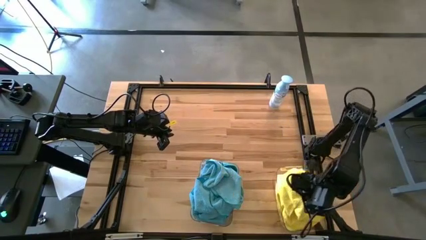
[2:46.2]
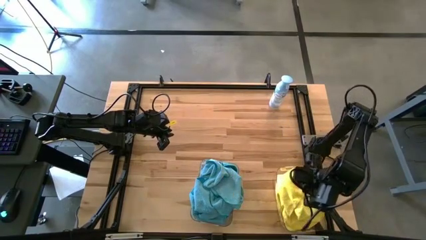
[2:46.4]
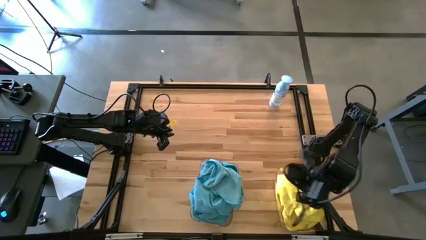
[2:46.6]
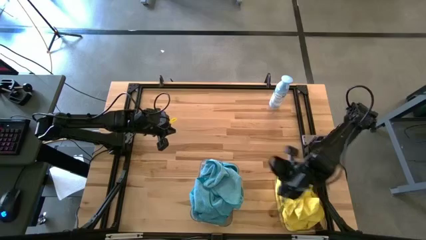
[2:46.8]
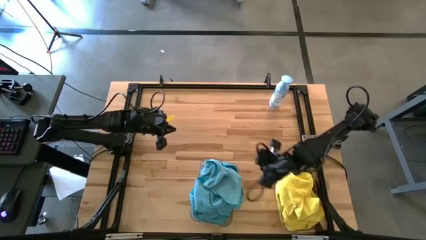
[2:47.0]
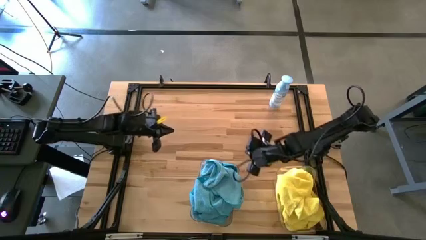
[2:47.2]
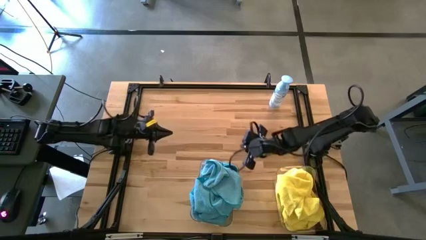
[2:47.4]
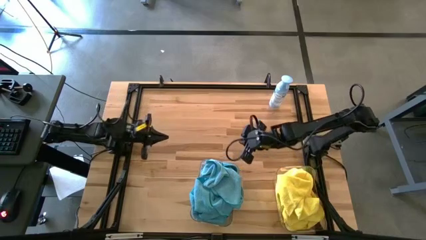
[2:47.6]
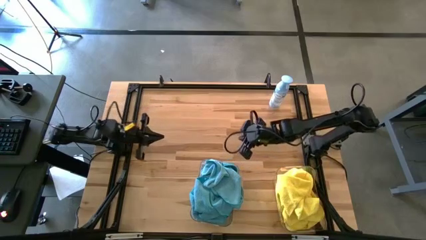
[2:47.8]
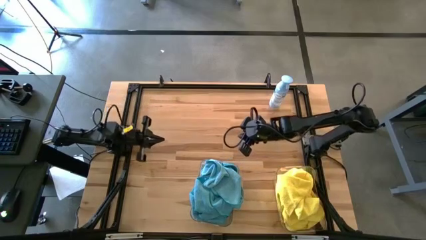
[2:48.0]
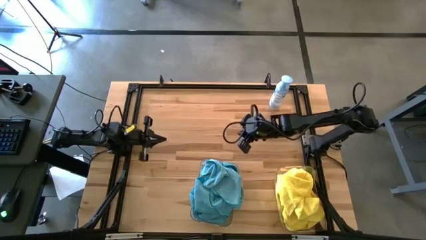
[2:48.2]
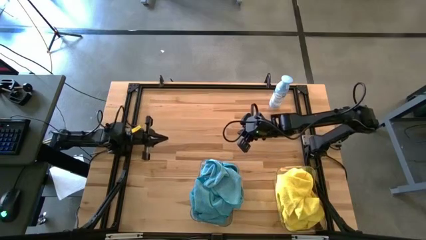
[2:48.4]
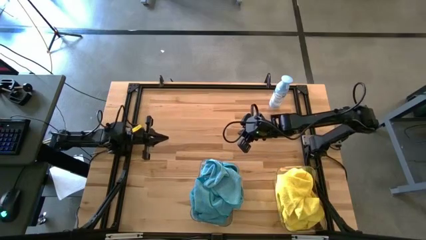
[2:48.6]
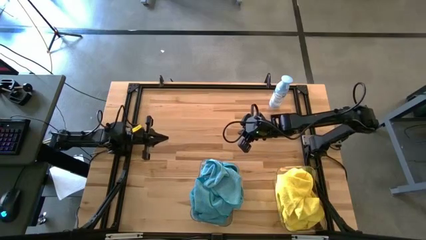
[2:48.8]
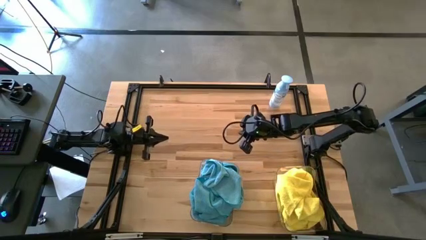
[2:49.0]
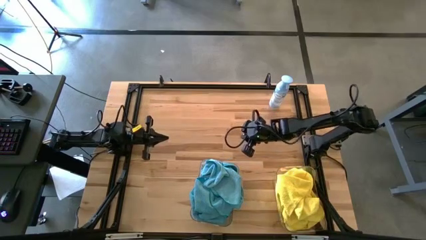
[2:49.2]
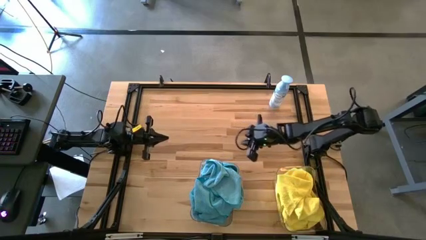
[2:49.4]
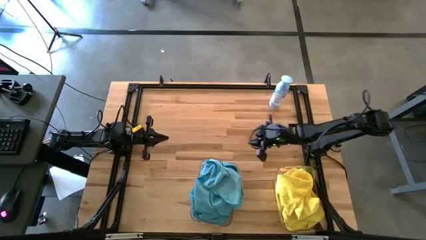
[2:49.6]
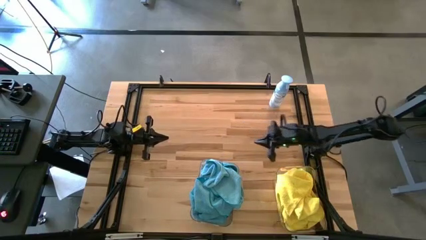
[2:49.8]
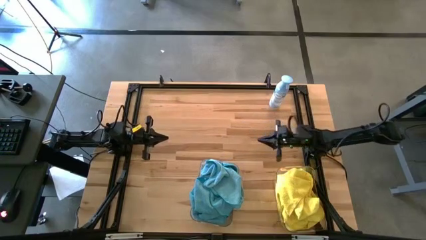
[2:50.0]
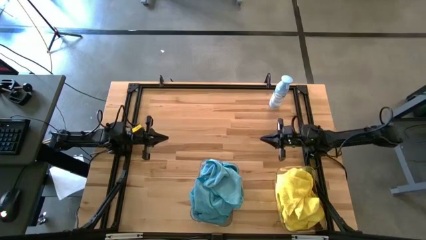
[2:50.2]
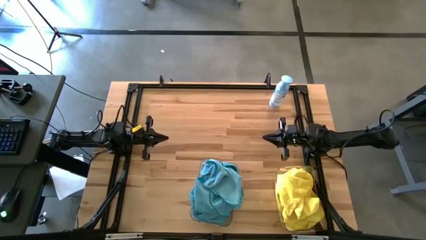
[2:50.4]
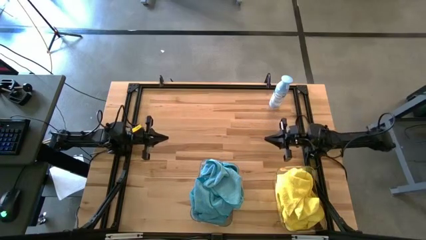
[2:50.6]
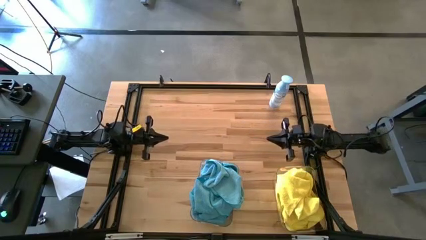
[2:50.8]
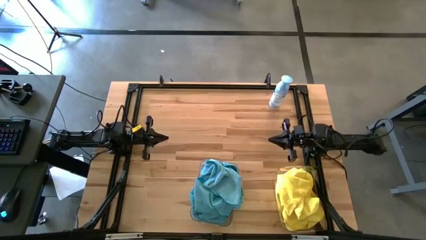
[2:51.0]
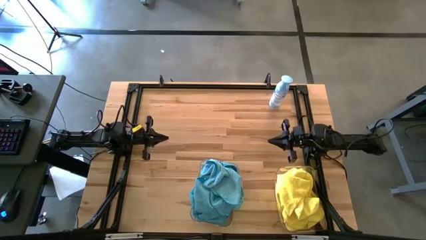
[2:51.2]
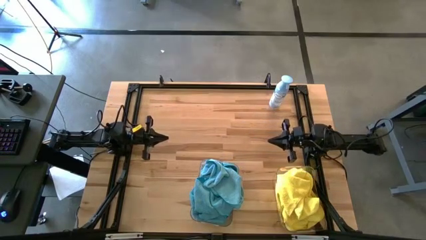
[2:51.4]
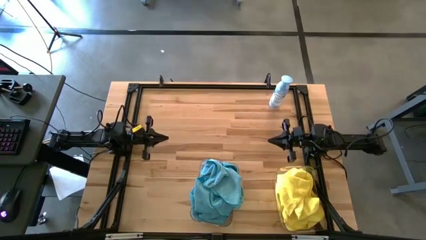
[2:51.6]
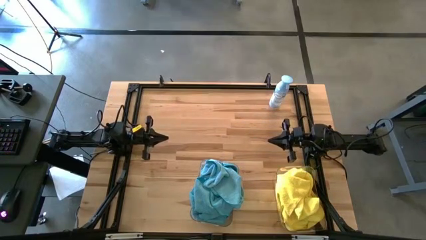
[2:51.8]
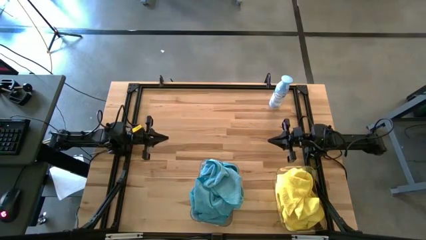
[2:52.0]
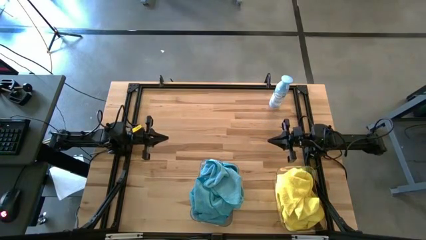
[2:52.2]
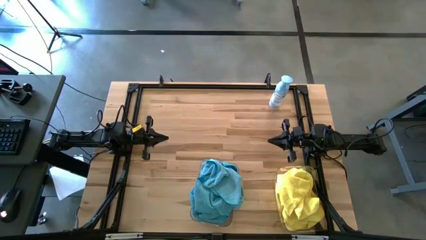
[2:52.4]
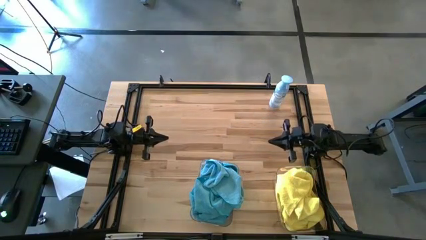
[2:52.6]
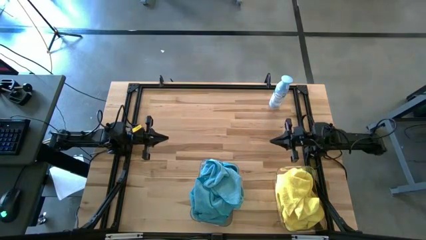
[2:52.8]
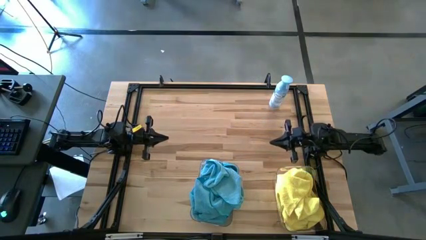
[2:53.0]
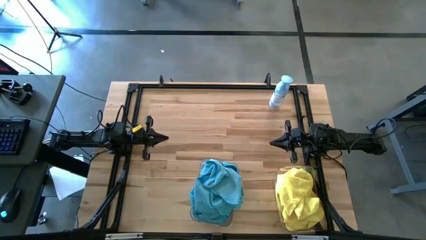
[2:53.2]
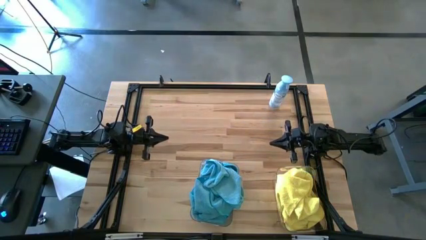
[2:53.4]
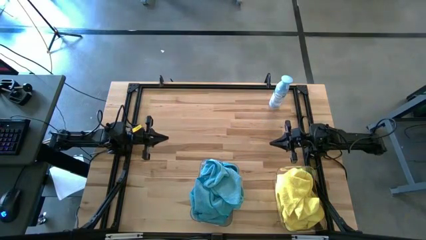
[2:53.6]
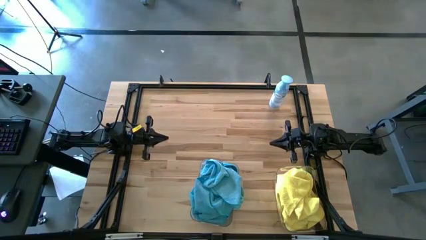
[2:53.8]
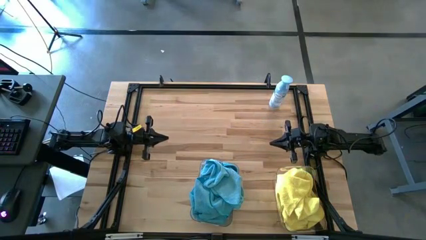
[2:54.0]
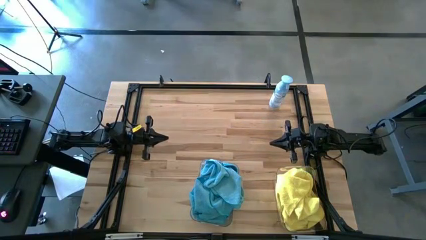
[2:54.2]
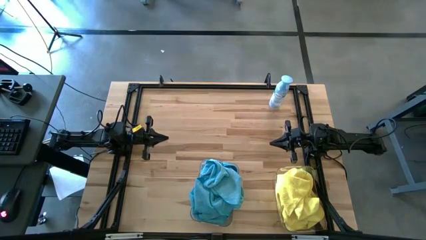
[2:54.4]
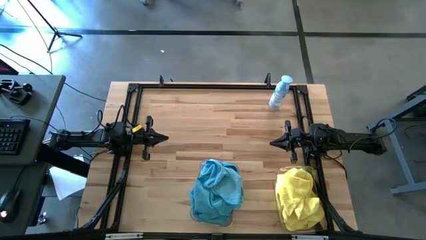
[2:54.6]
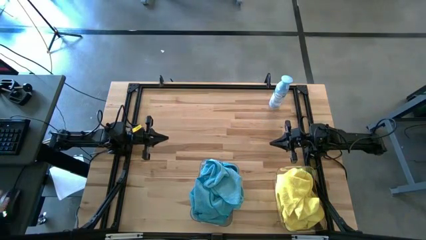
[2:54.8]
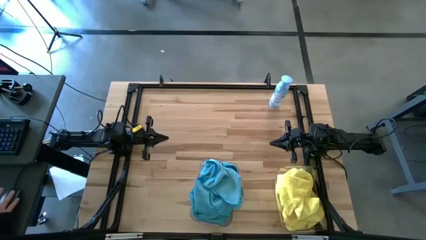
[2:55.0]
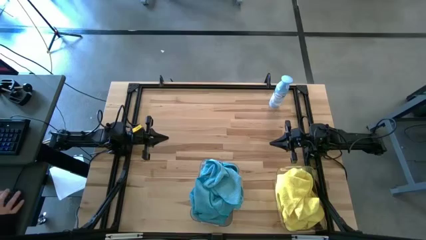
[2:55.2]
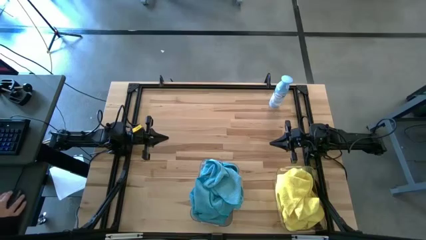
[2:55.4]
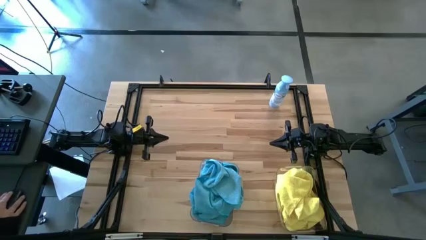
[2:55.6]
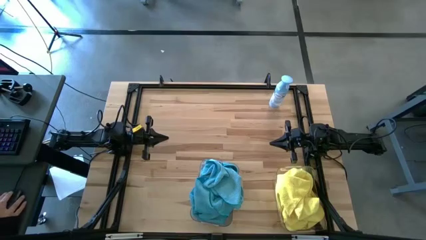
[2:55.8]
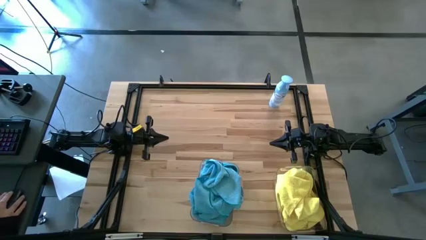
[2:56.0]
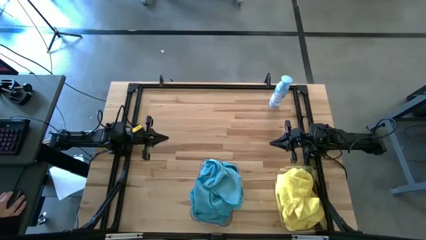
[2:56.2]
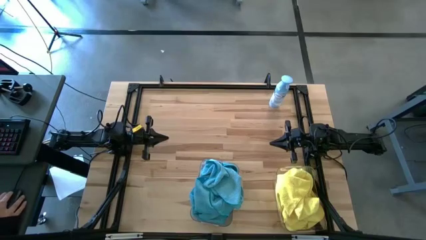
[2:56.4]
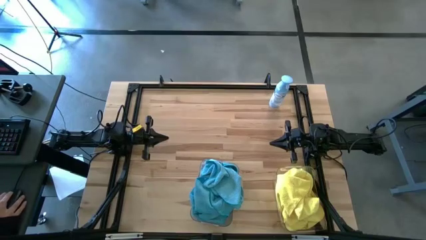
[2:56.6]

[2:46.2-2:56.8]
Task: Sort microfiber towel by color & place in baskets
Return to Home Position
